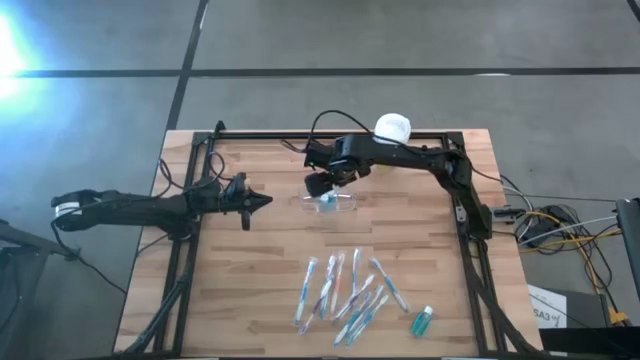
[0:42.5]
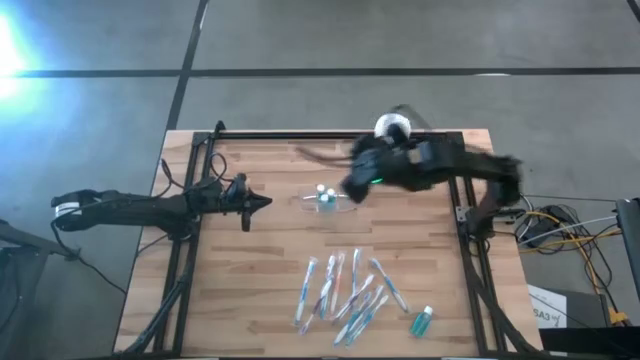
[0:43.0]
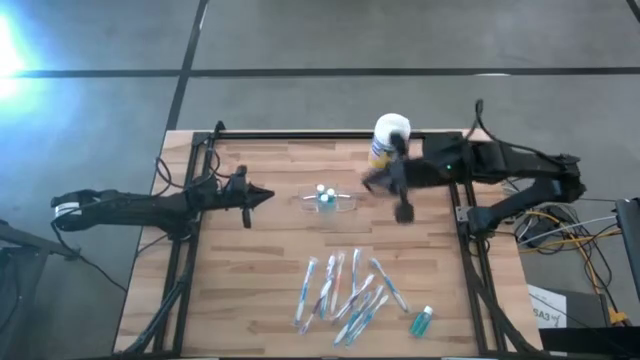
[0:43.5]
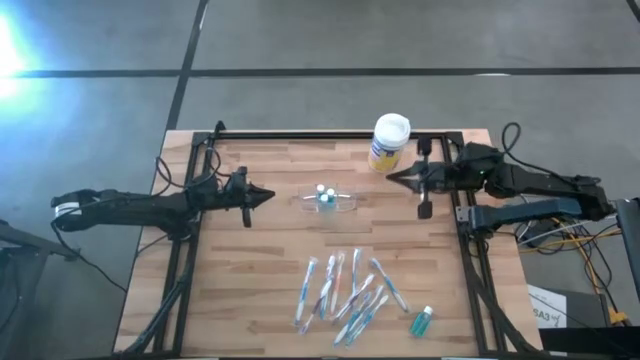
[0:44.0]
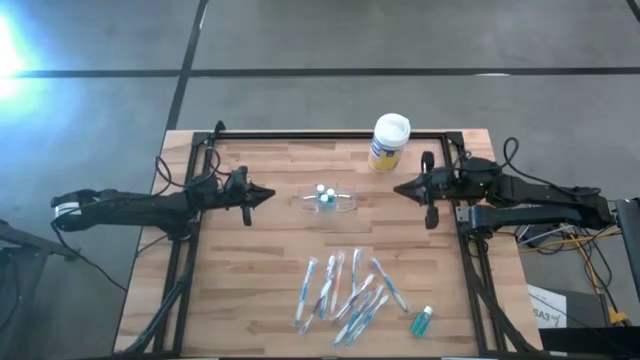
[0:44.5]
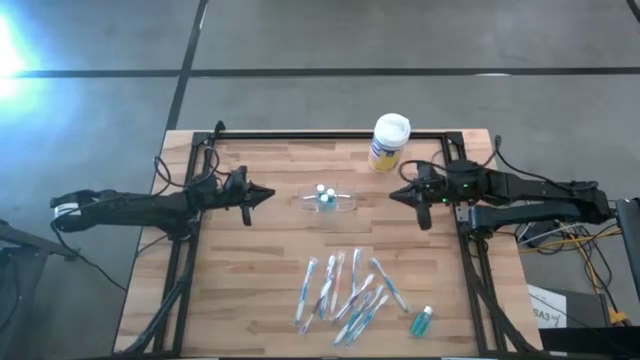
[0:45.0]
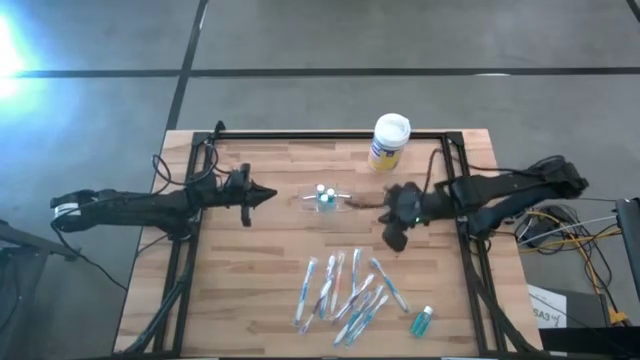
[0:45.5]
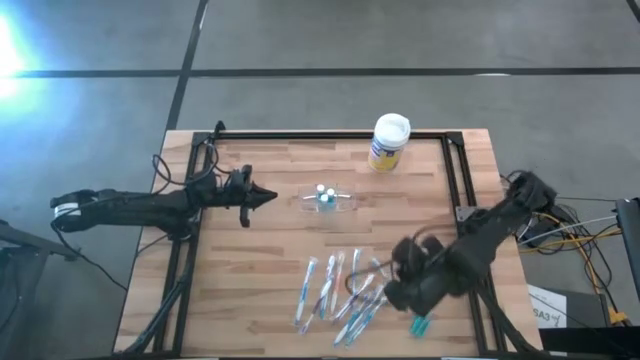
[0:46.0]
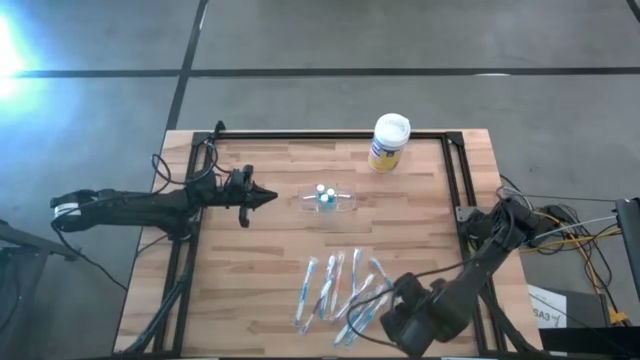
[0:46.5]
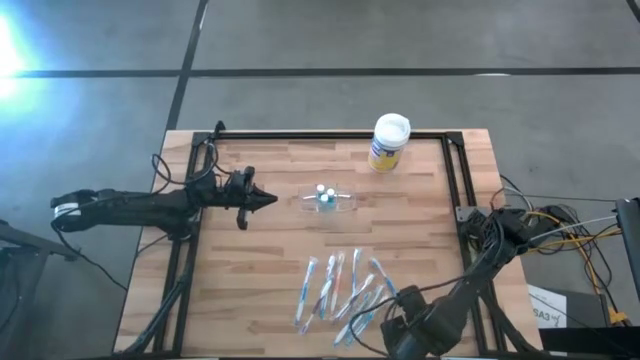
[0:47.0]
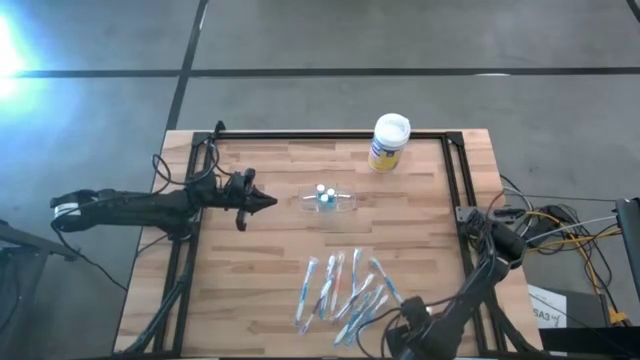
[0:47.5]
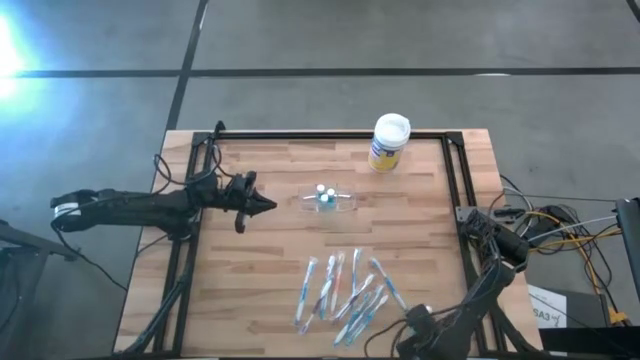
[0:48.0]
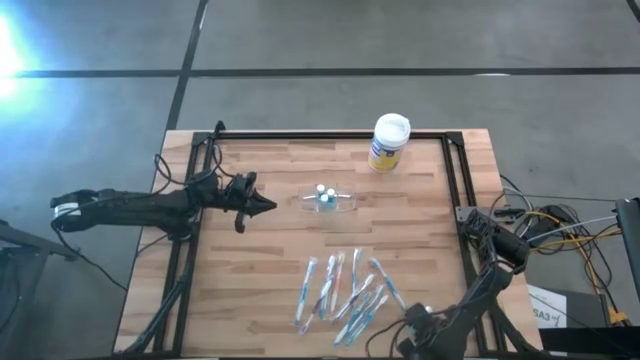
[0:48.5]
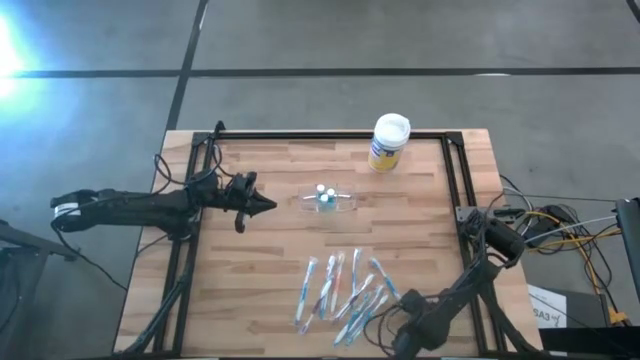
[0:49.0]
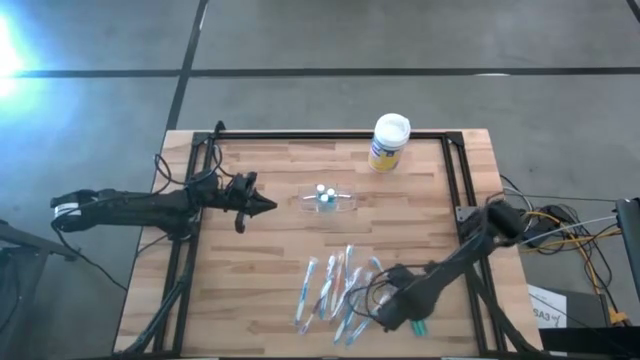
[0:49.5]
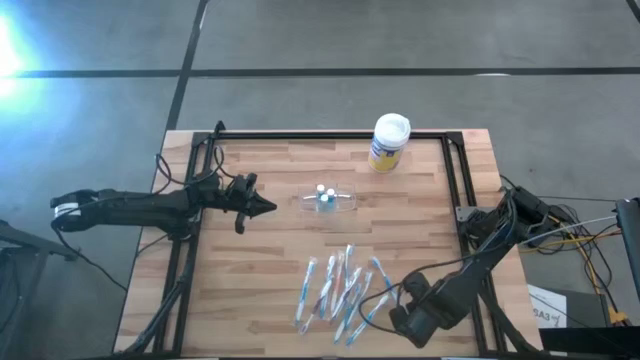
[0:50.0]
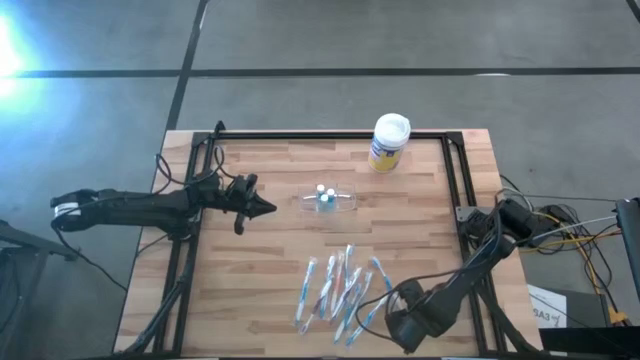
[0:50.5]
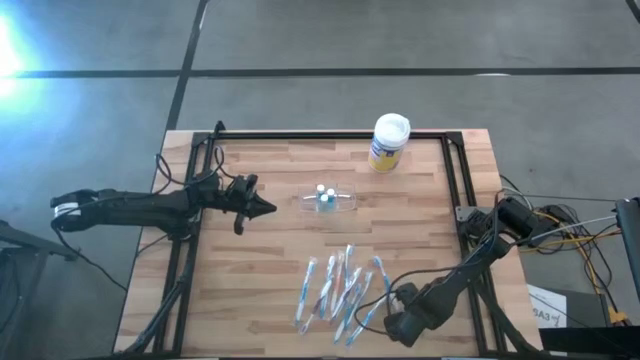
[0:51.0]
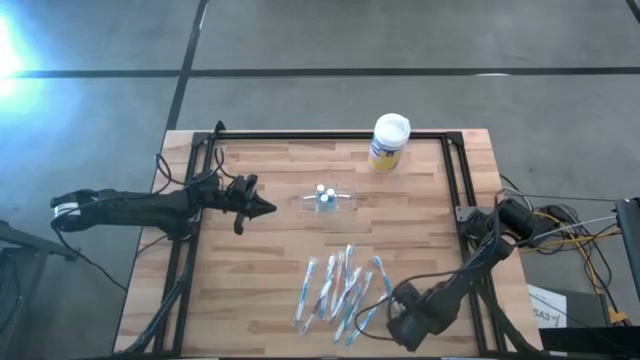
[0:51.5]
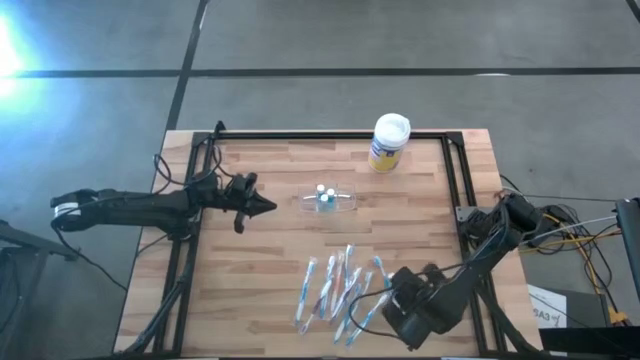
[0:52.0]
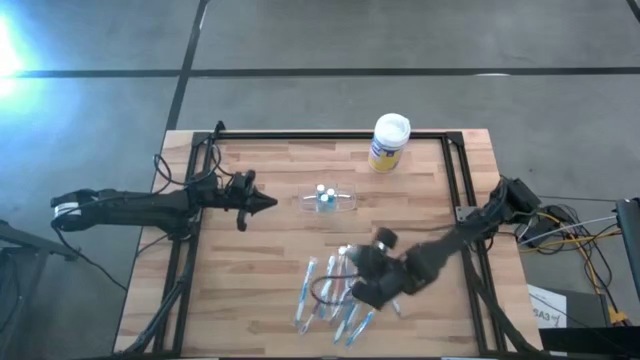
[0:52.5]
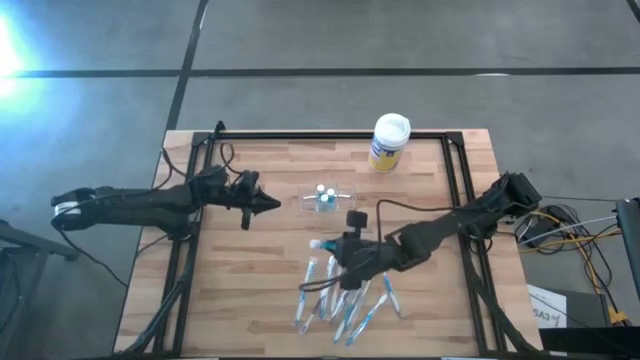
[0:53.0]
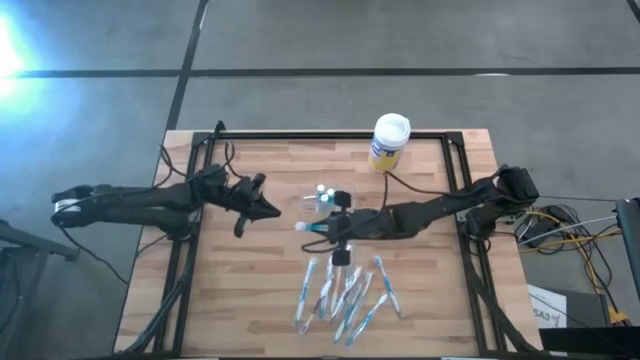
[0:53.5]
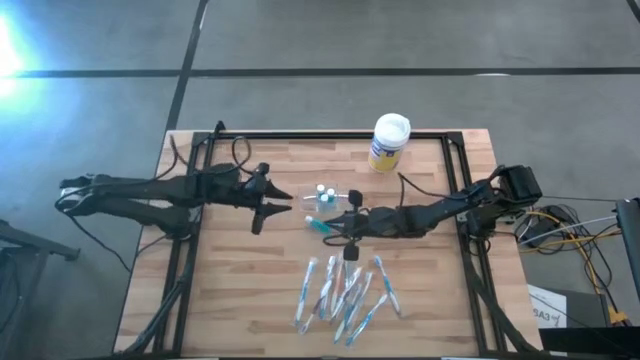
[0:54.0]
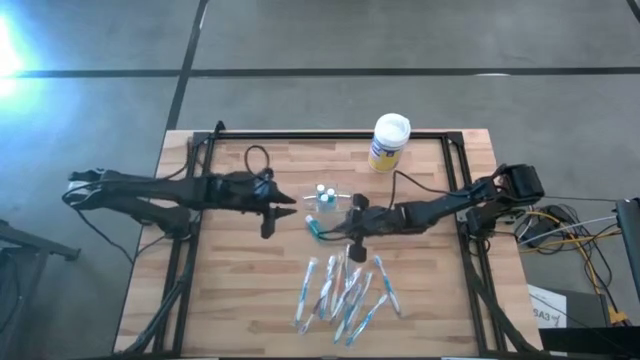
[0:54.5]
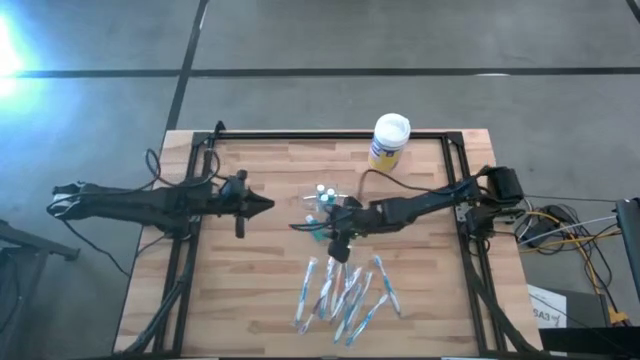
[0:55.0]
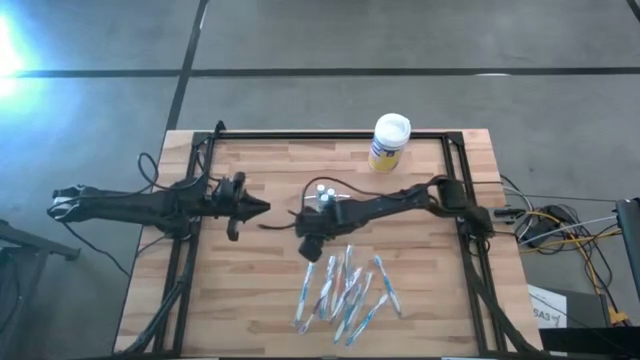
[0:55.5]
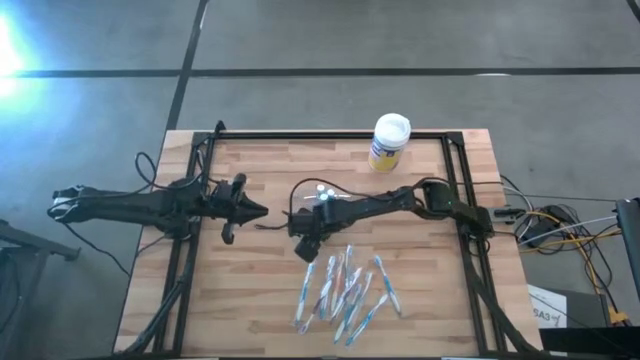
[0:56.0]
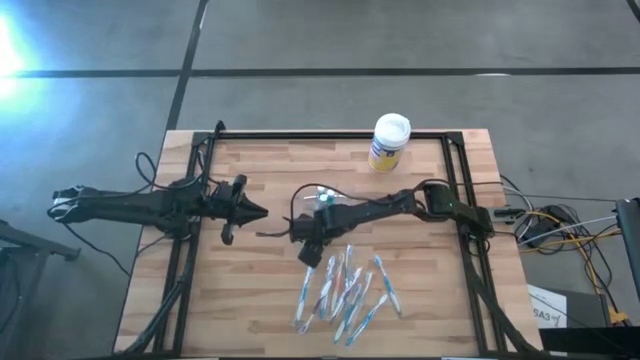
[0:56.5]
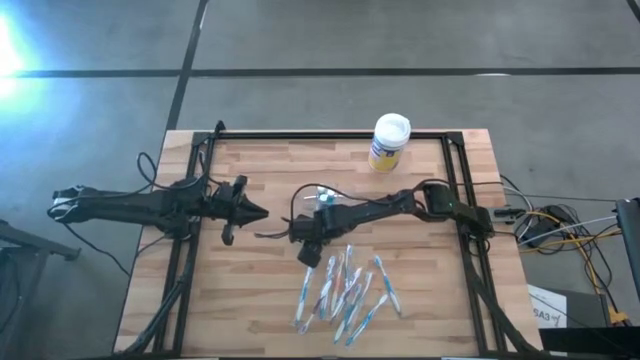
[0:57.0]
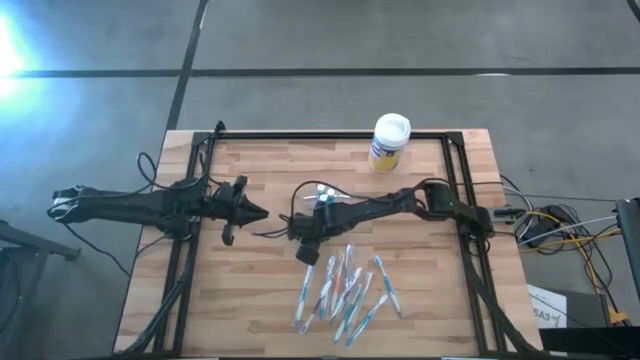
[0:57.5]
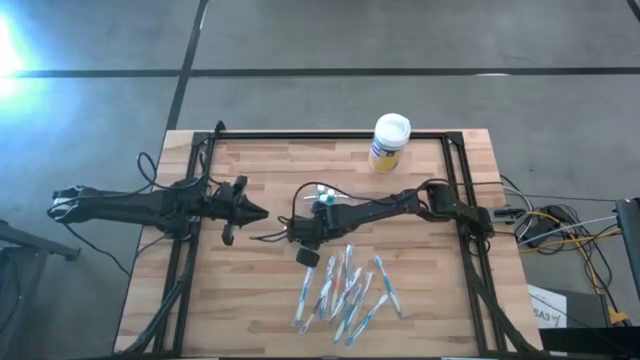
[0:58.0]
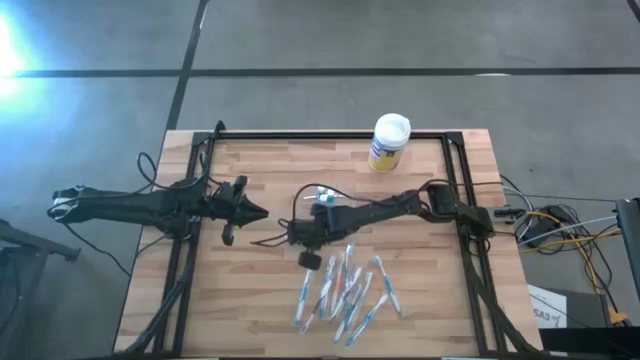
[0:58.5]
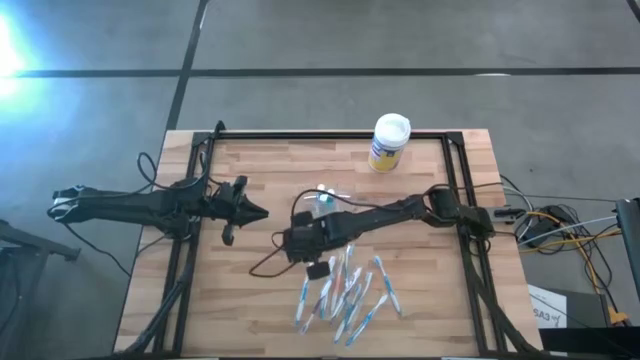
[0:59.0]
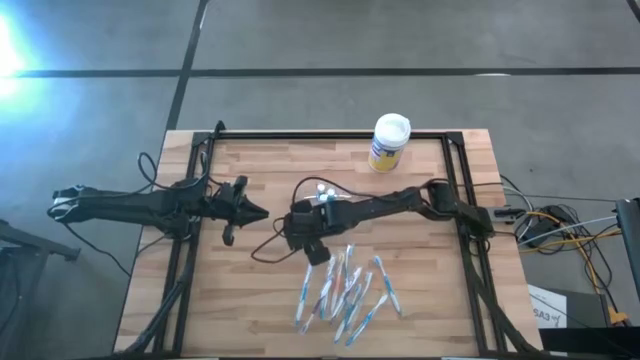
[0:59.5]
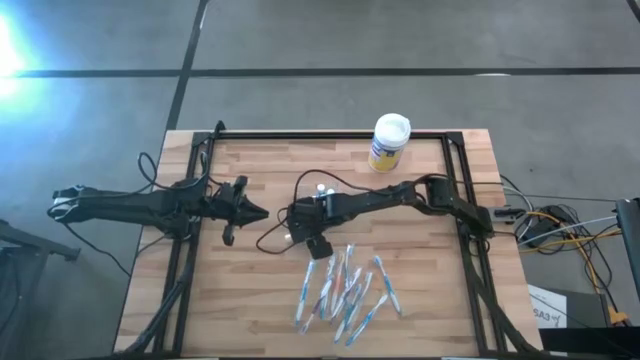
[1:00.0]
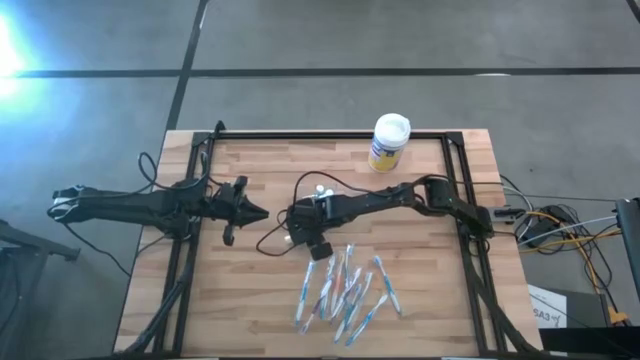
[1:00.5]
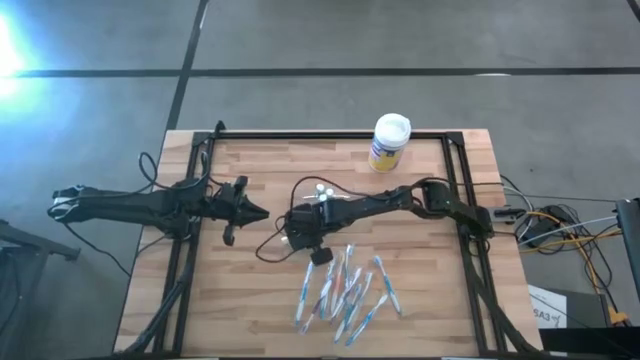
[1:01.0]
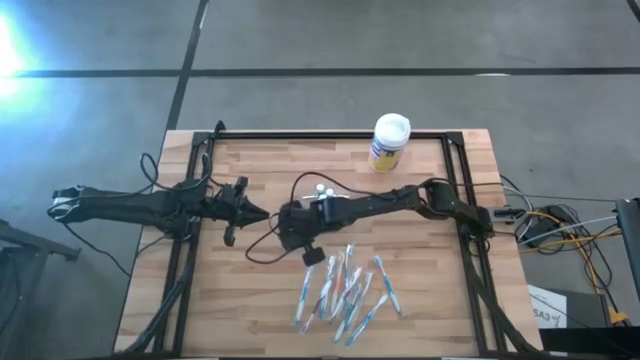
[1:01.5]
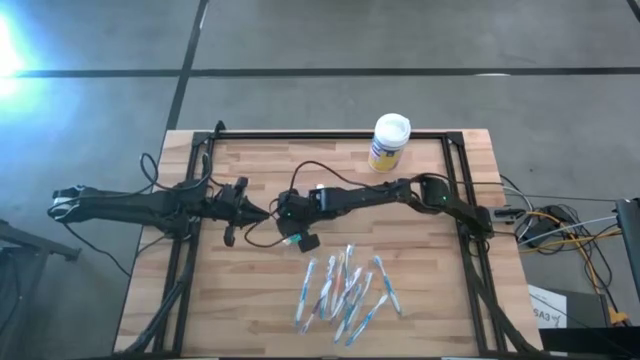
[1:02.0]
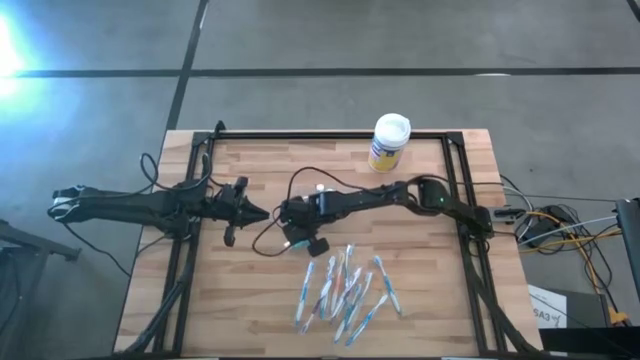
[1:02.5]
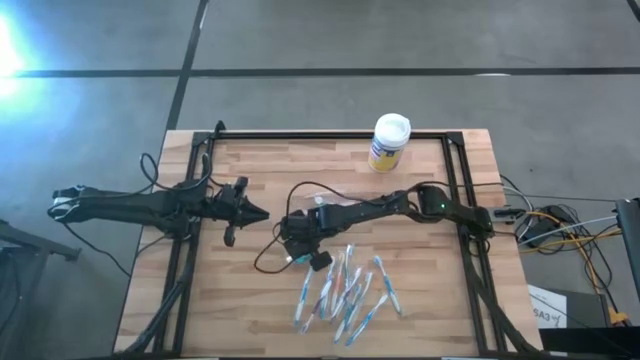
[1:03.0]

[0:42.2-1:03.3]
Task: Pick & Place toothbrushing station
Put the blue mouthwash into the transparent organizer

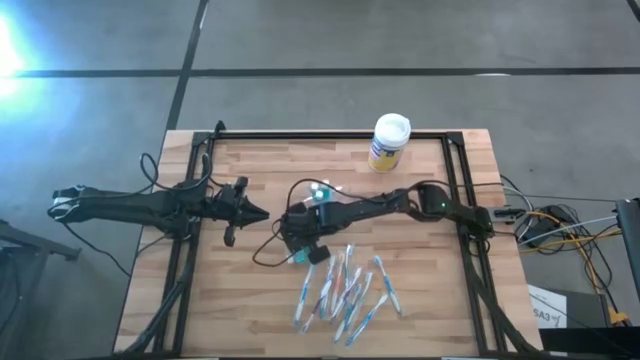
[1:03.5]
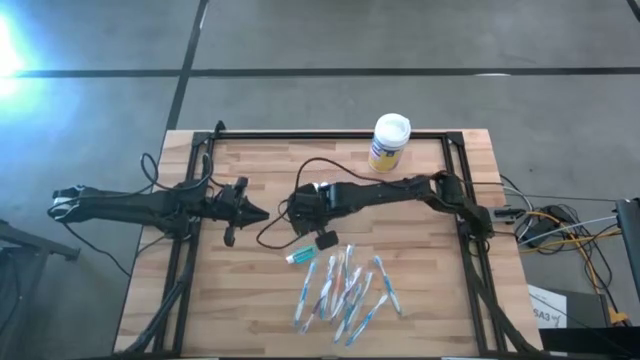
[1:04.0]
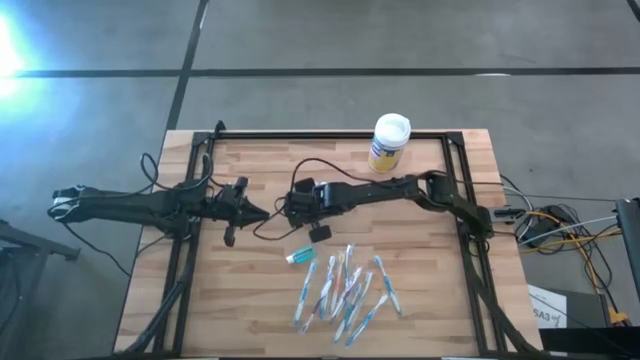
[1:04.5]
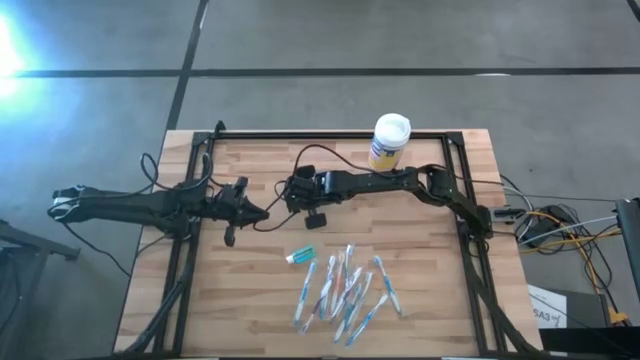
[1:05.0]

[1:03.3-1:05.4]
Adjust the transparent organizer
